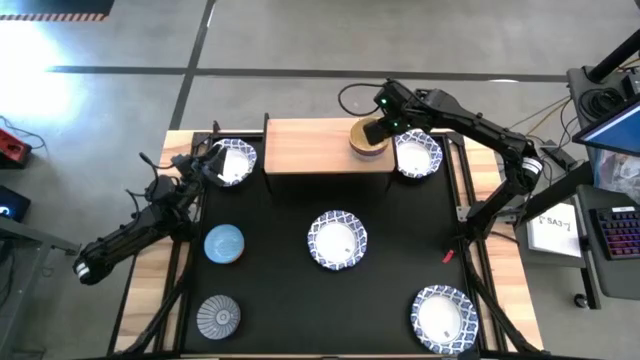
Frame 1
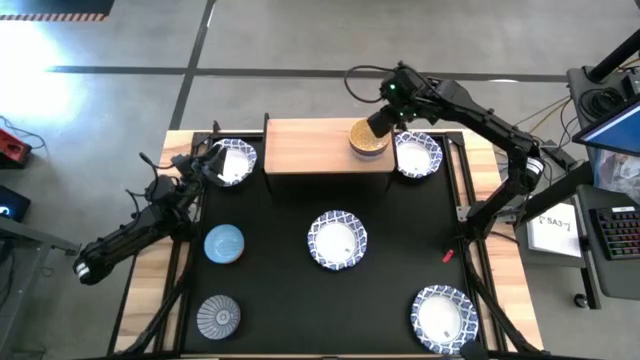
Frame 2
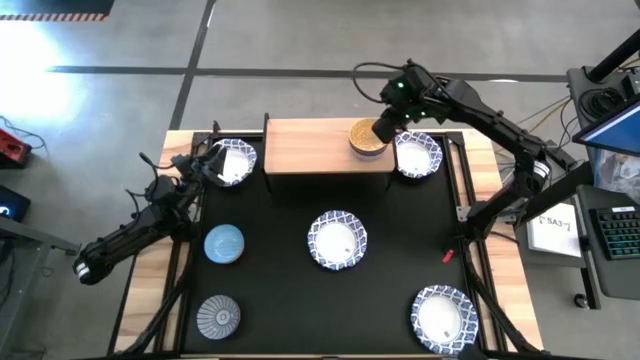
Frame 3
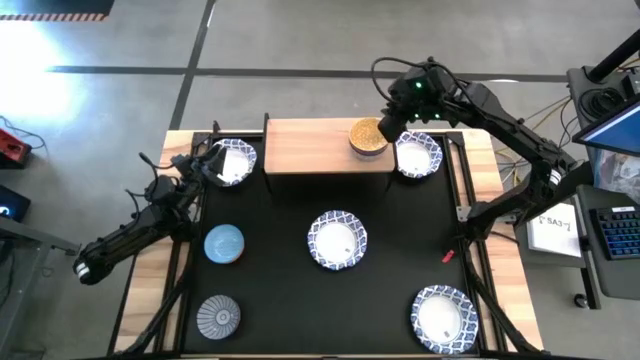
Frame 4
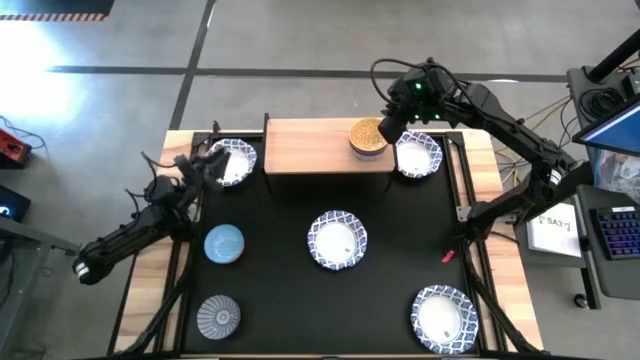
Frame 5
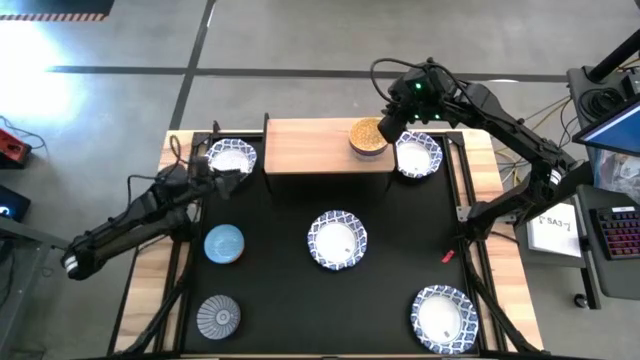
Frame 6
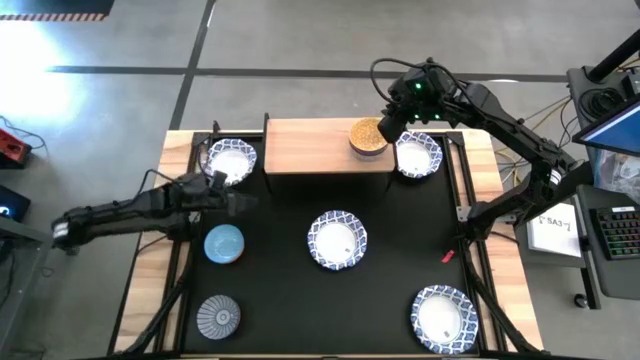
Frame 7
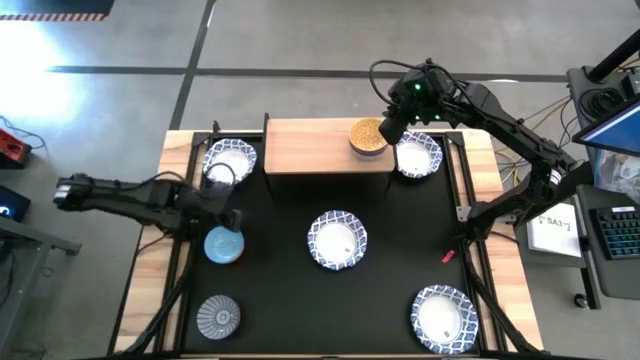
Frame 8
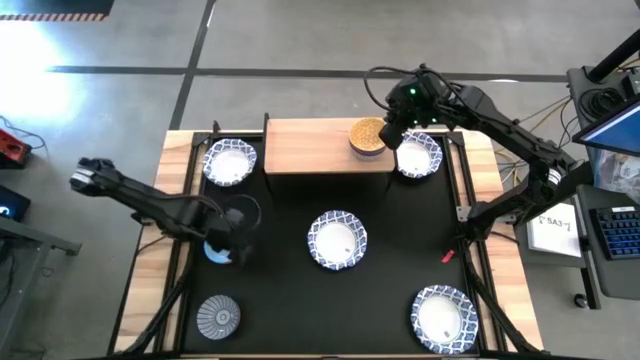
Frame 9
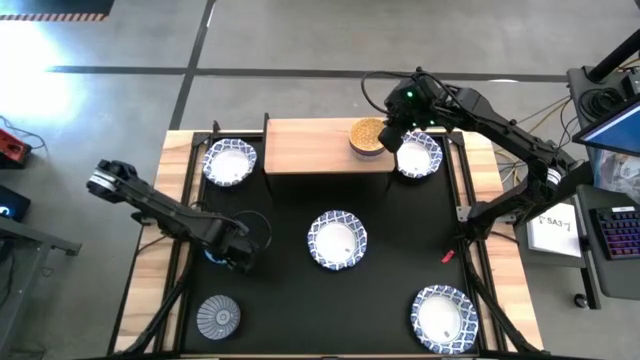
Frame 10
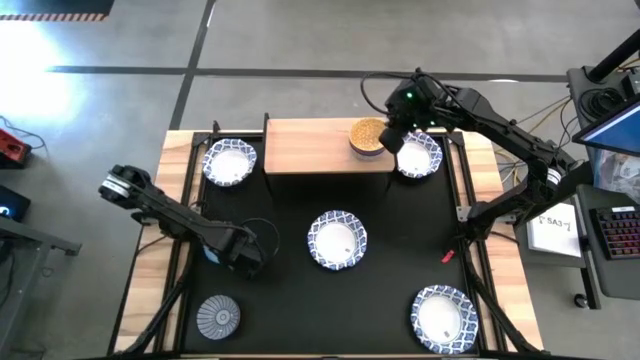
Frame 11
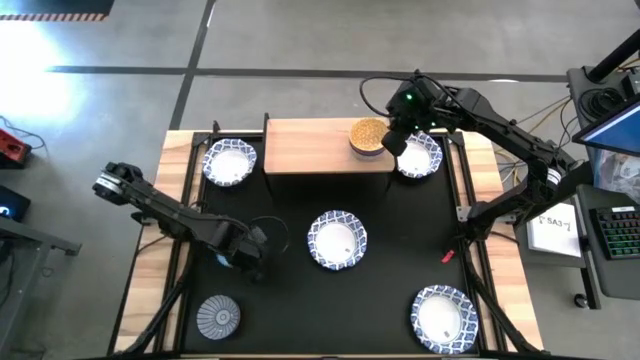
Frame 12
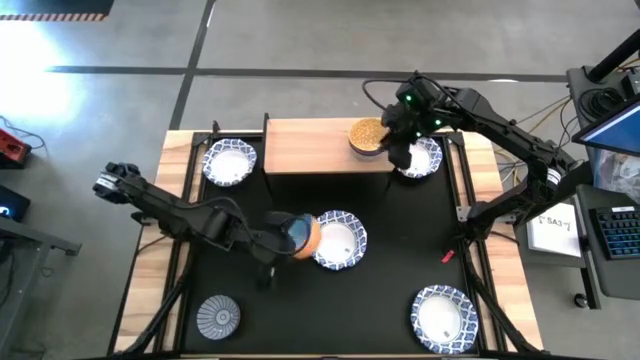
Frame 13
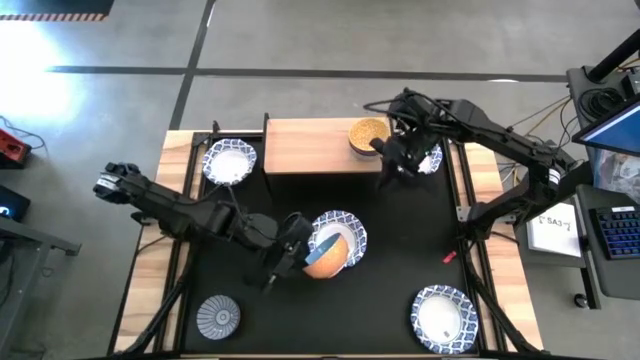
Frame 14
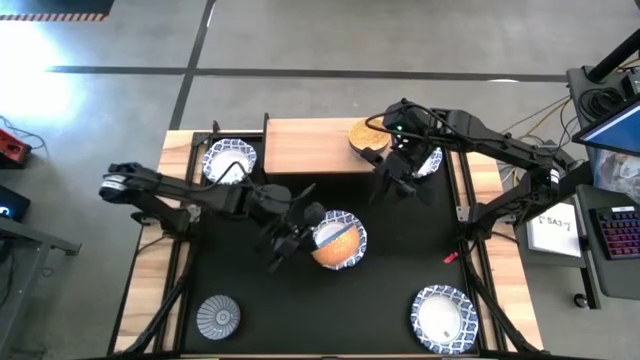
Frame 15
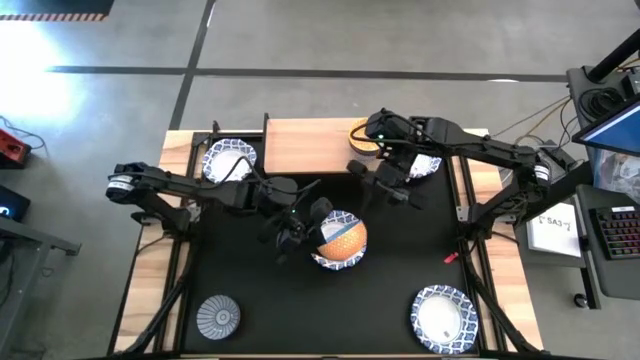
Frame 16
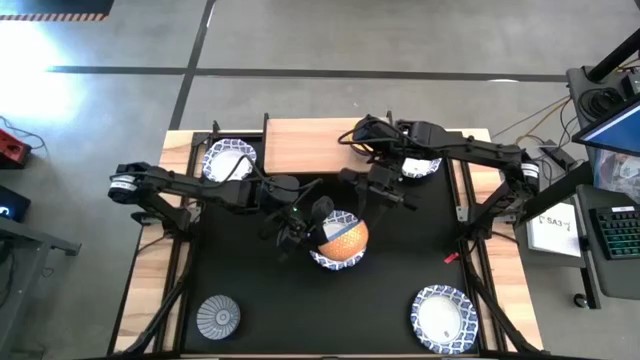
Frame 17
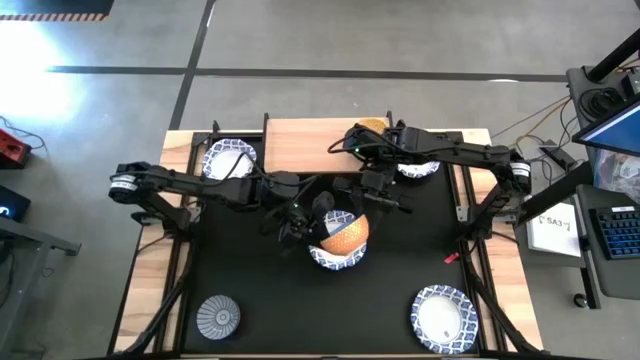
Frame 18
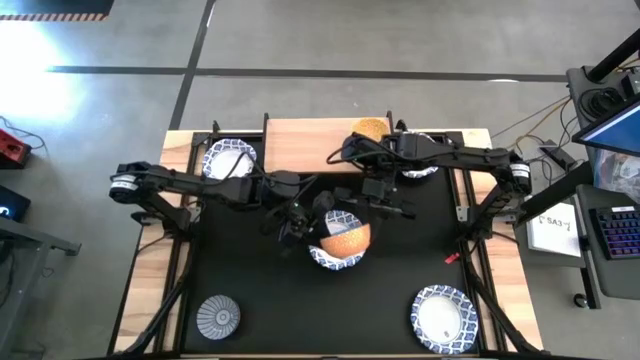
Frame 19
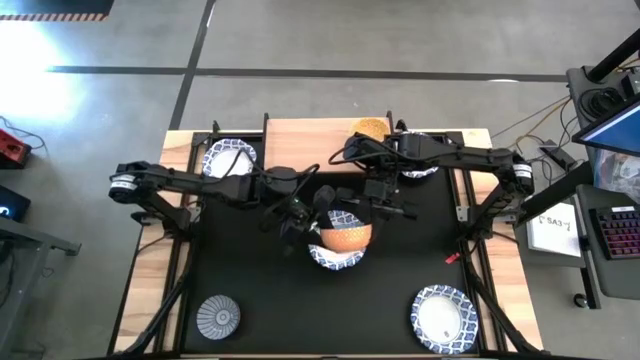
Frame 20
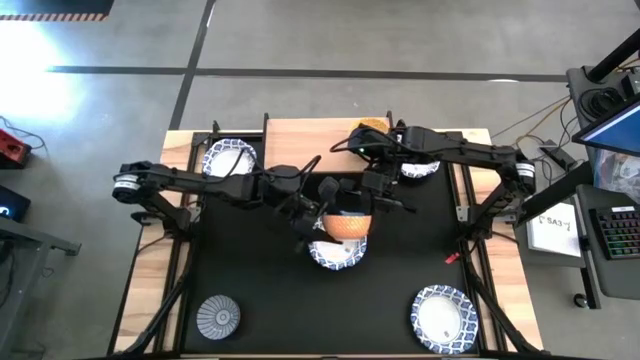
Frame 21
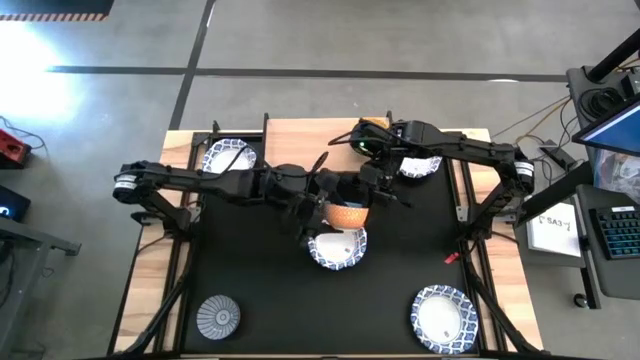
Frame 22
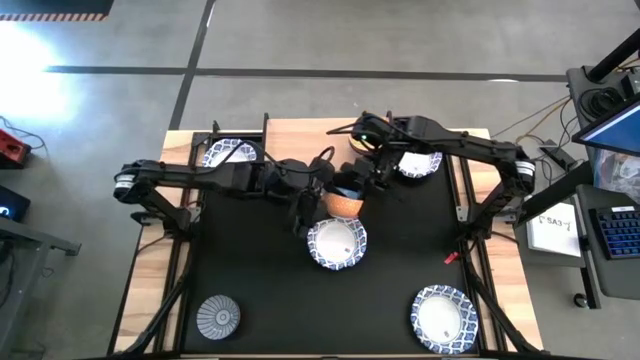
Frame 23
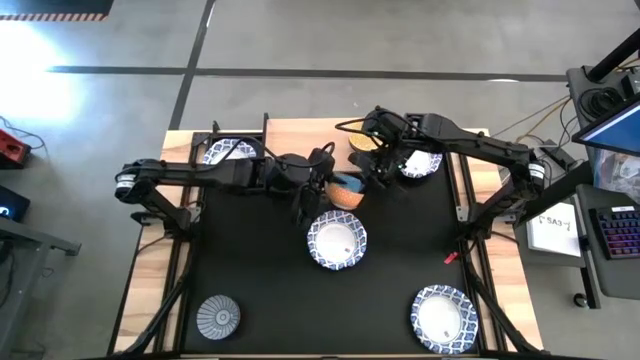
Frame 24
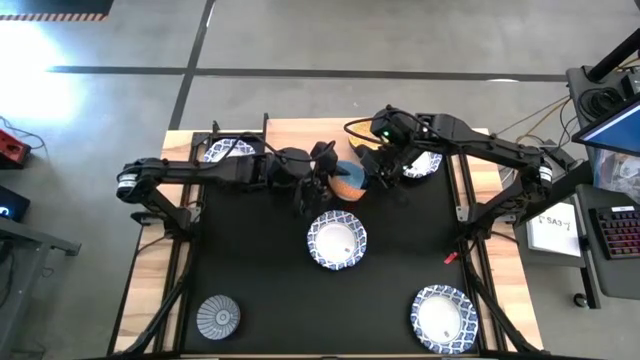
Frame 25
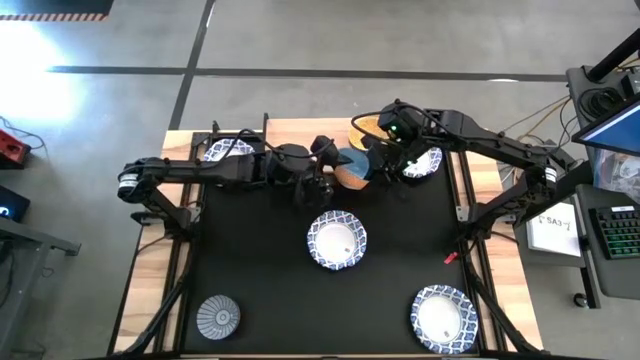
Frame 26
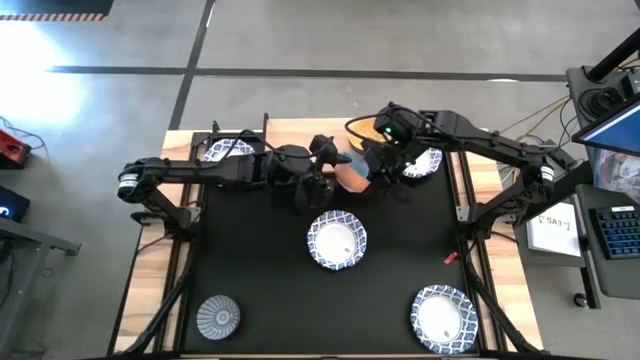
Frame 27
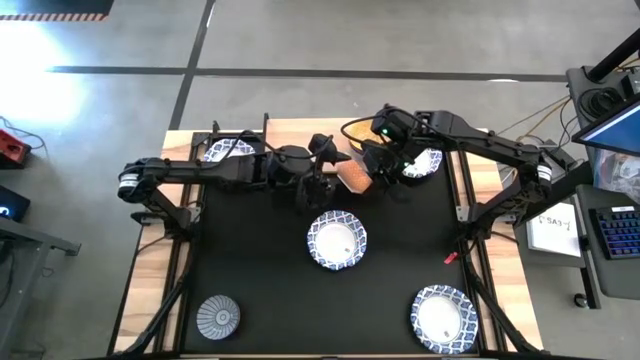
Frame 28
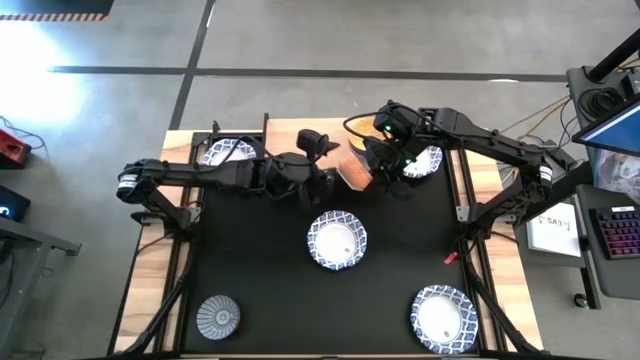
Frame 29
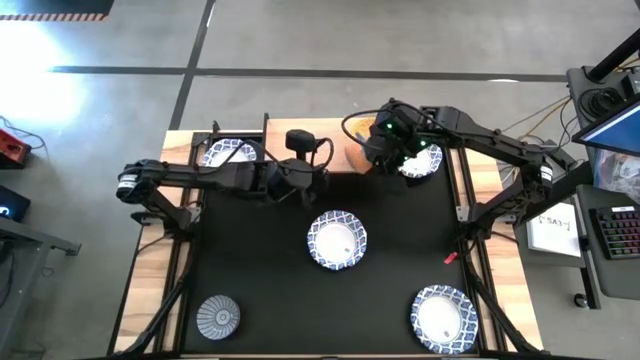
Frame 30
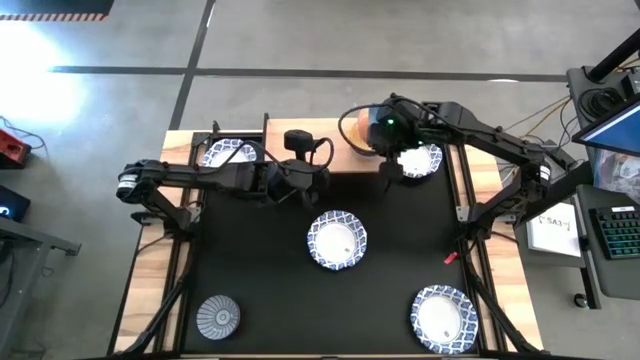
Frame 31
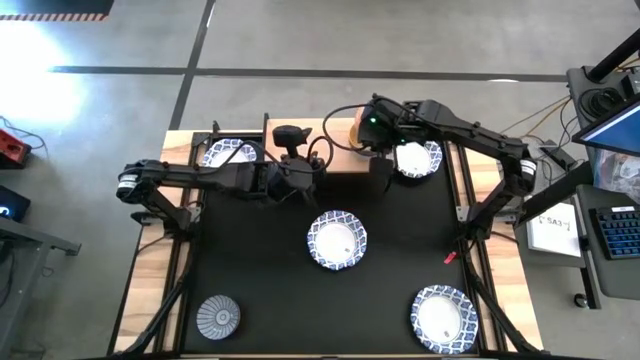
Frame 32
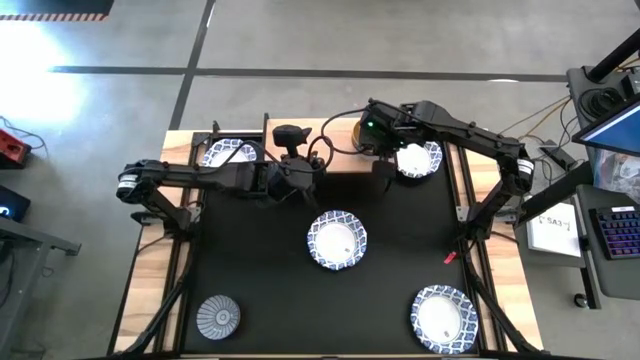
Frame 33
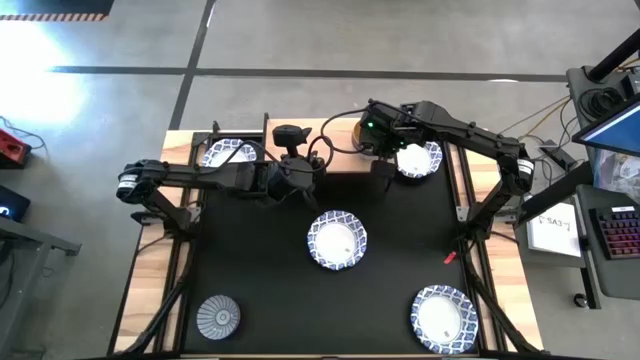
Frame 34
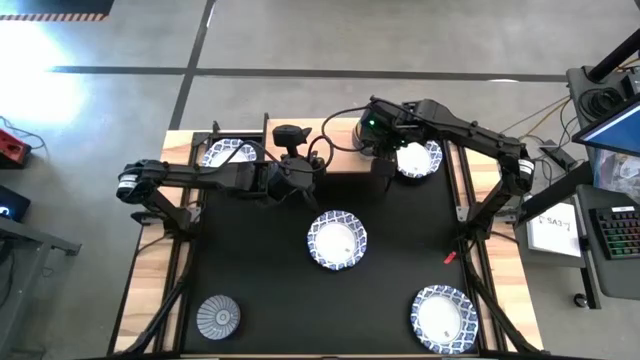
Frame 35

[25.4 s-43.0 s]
Task: Place and stack bowls onto a shelf
Stack the light blue bowl on top of the yellow bowl on the shelf

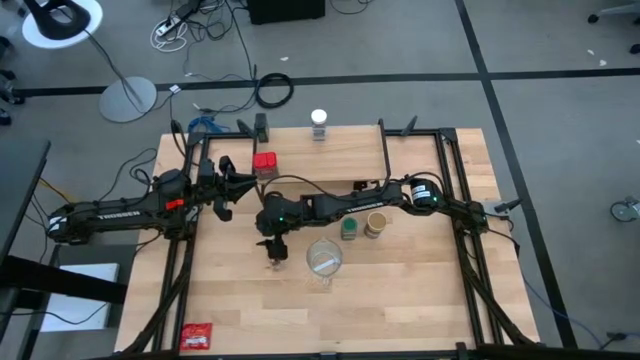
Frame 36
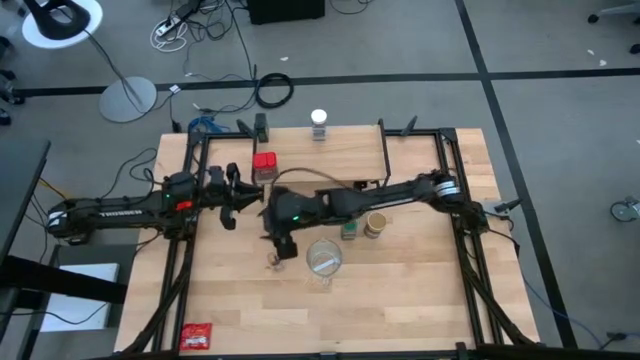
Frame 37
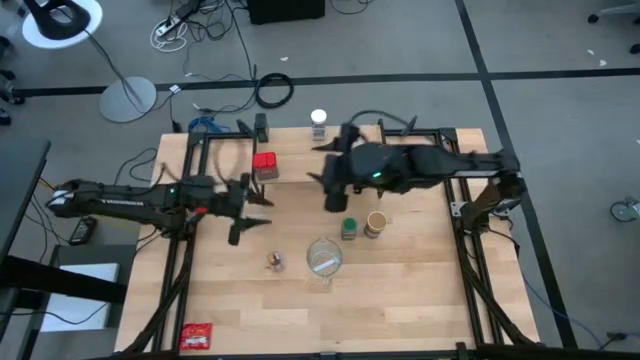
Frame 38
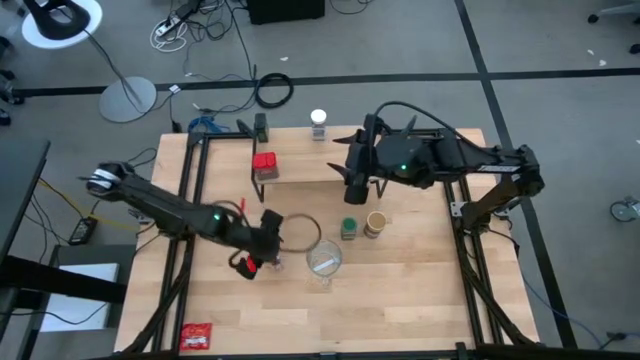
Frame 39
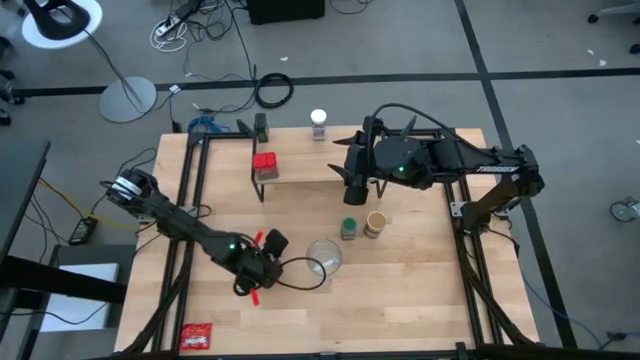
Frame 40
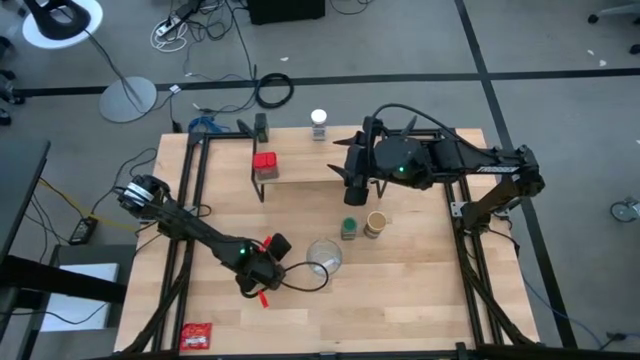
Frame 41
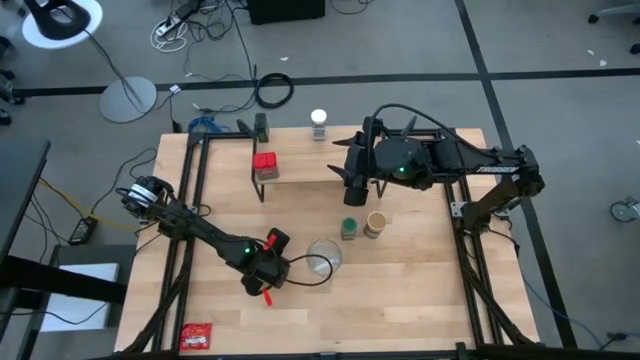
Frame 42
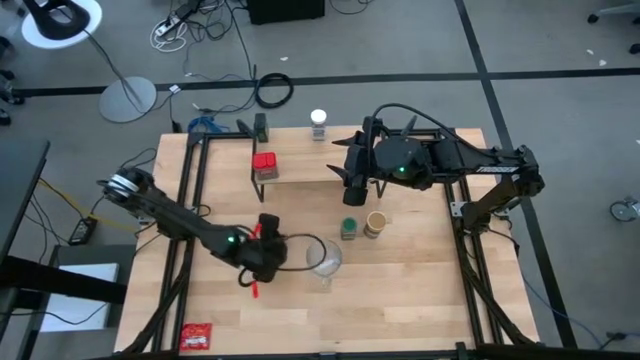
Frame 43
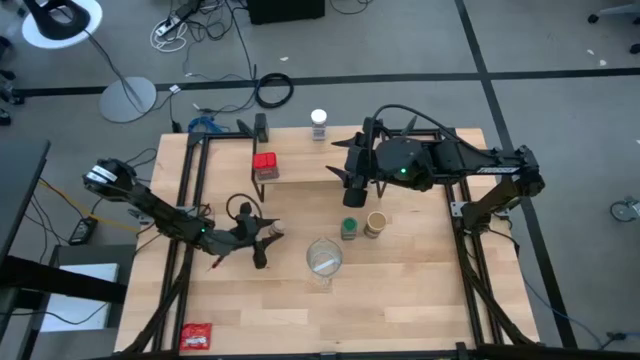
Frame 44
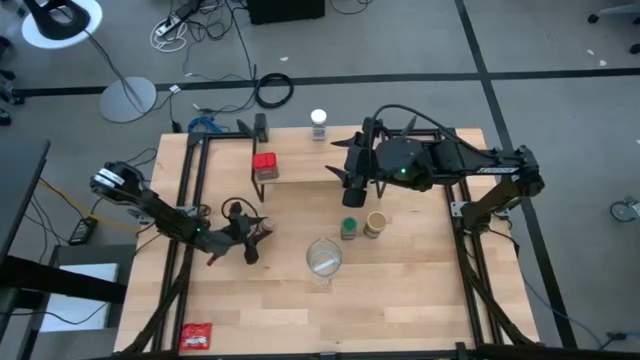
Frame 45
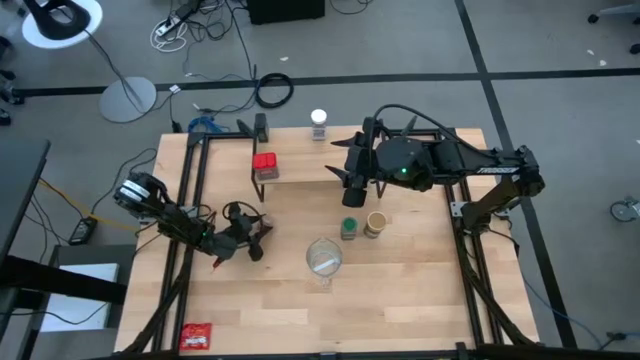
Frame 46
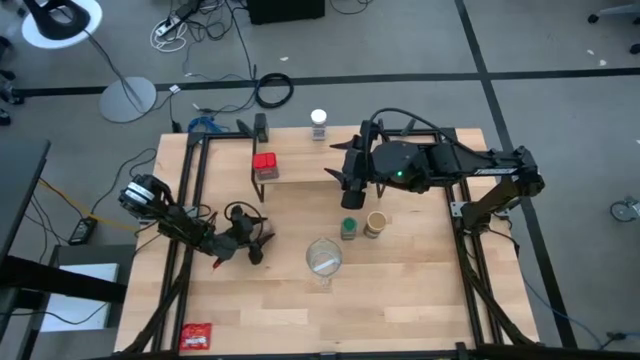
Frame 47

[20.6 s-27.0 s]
Task: Shelf spices
Remove the transparent seasoning bottle from the shelf
